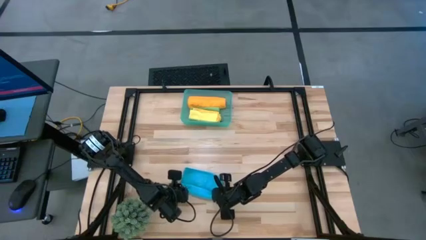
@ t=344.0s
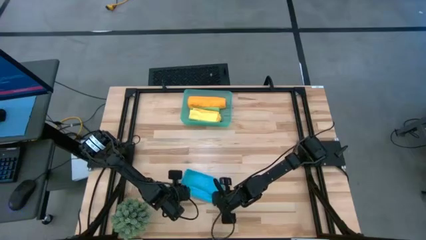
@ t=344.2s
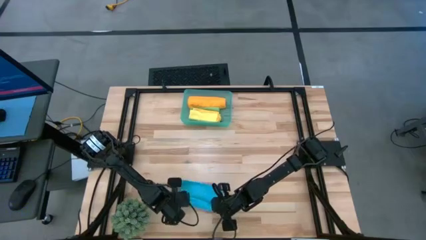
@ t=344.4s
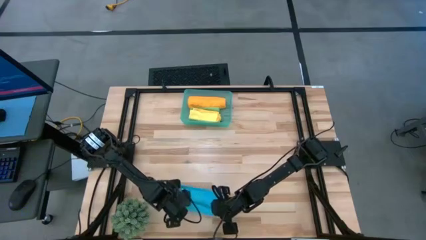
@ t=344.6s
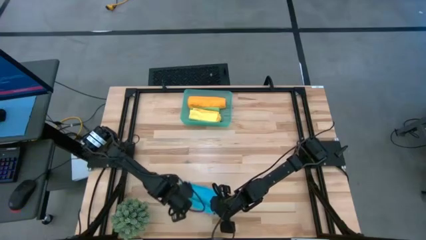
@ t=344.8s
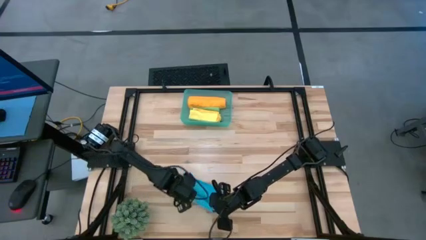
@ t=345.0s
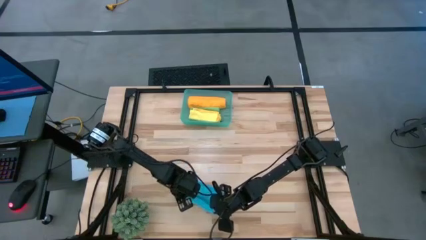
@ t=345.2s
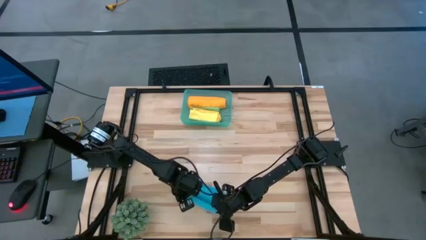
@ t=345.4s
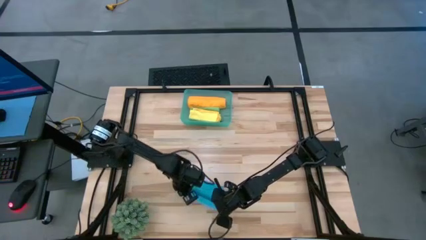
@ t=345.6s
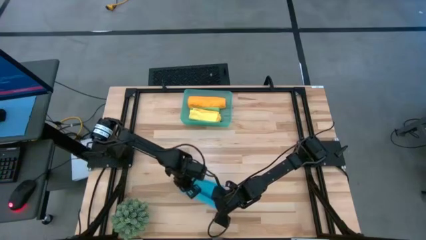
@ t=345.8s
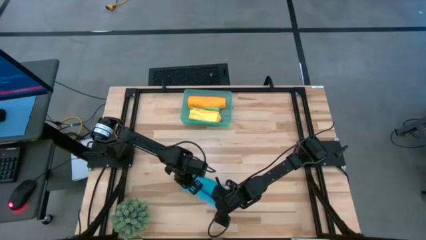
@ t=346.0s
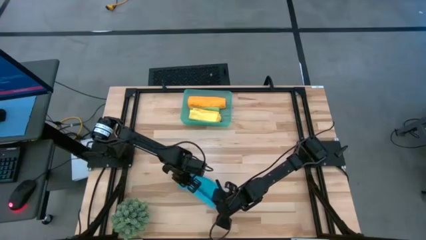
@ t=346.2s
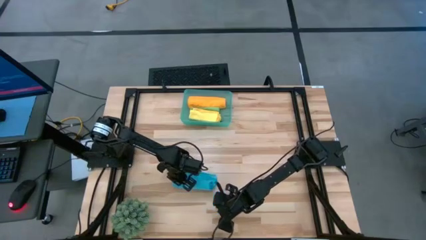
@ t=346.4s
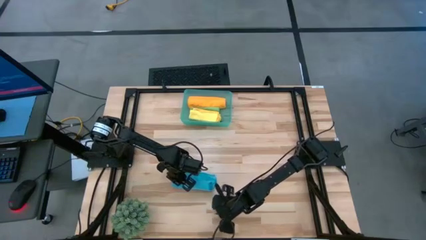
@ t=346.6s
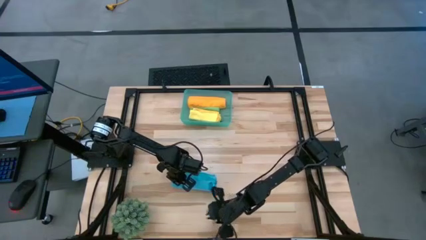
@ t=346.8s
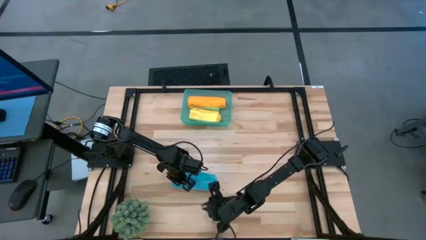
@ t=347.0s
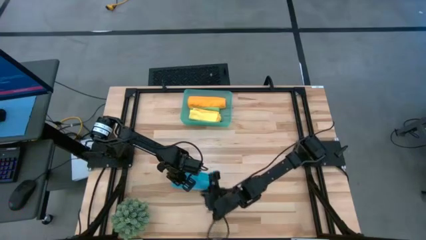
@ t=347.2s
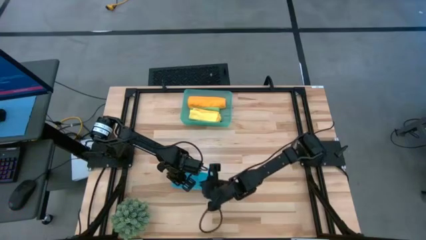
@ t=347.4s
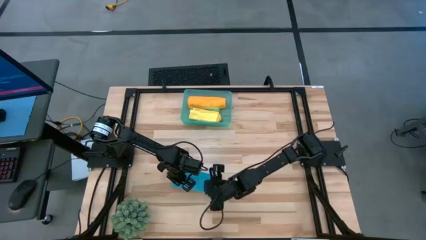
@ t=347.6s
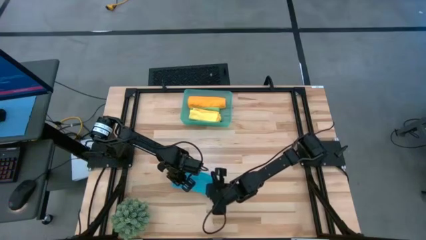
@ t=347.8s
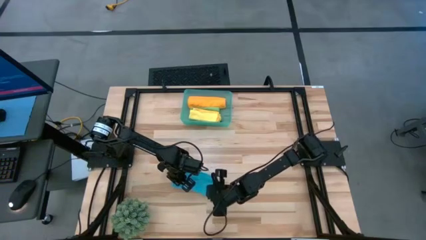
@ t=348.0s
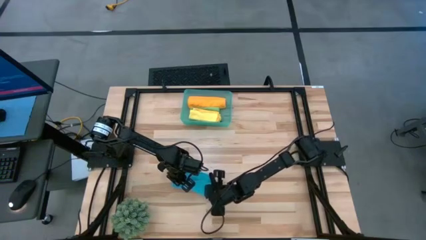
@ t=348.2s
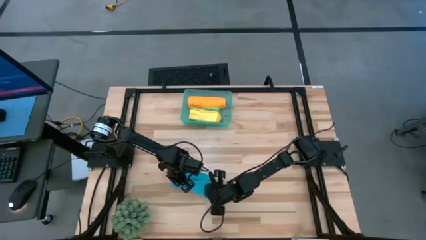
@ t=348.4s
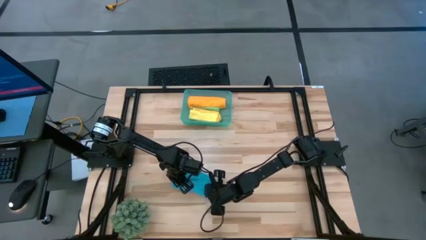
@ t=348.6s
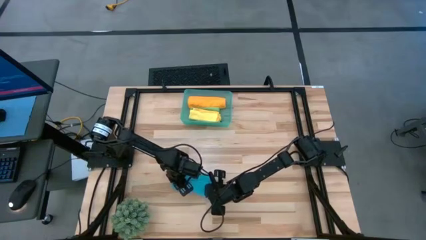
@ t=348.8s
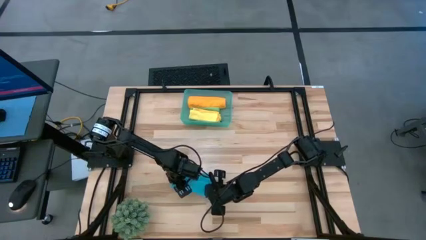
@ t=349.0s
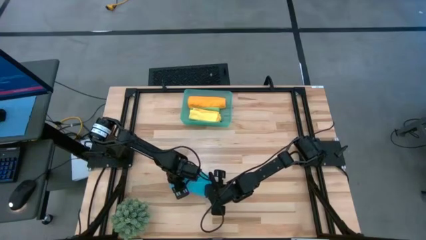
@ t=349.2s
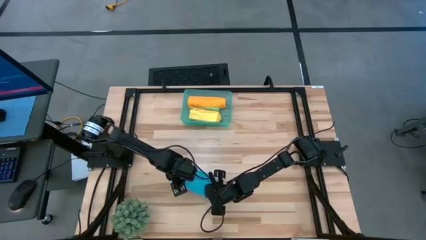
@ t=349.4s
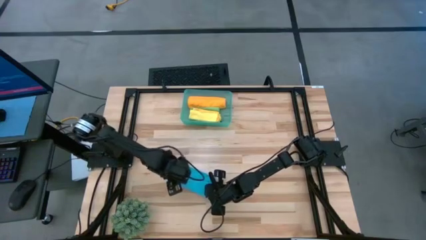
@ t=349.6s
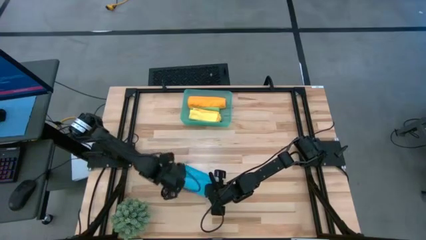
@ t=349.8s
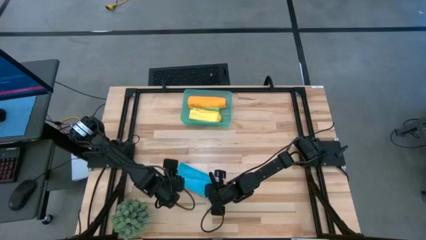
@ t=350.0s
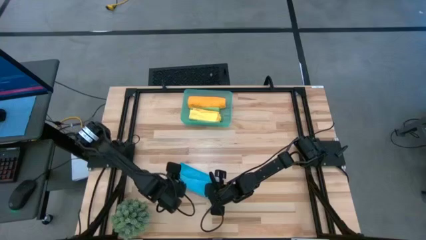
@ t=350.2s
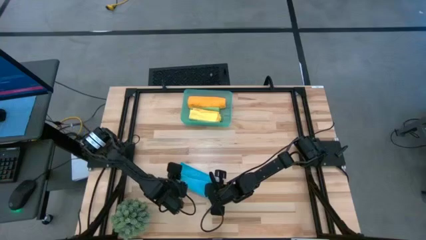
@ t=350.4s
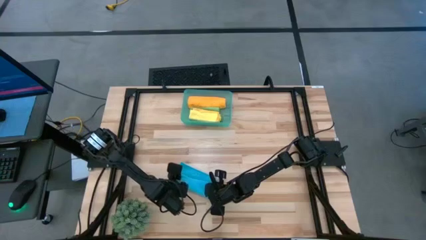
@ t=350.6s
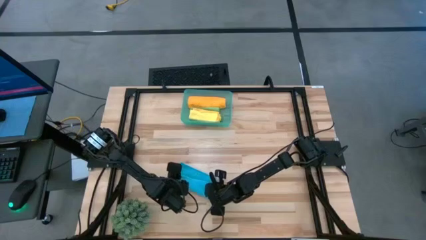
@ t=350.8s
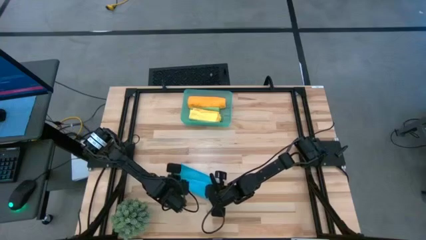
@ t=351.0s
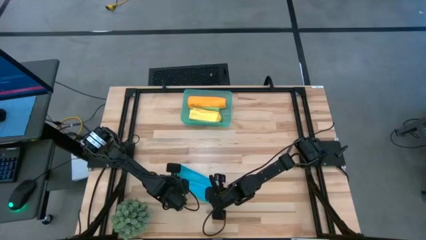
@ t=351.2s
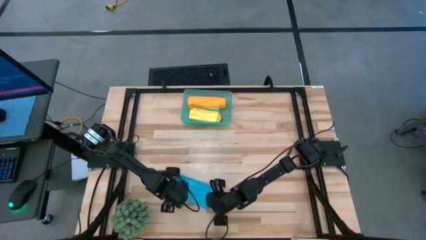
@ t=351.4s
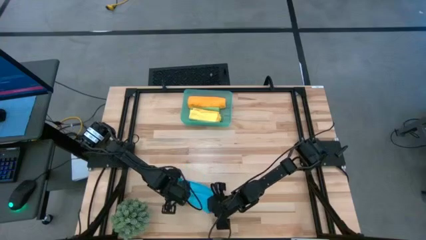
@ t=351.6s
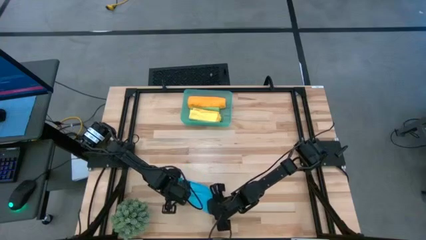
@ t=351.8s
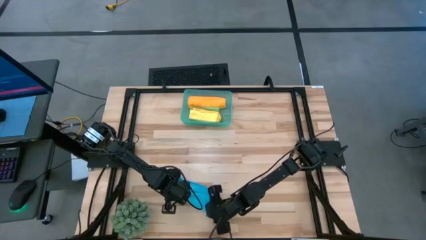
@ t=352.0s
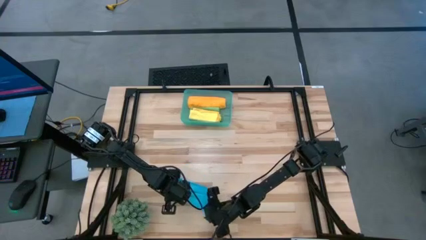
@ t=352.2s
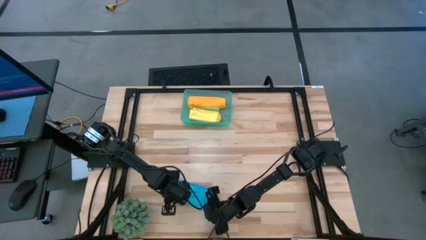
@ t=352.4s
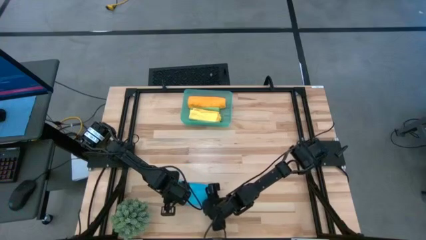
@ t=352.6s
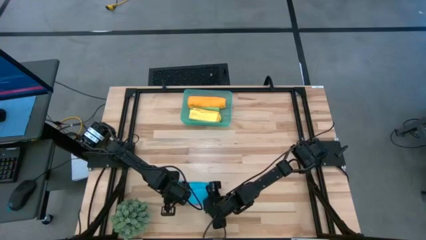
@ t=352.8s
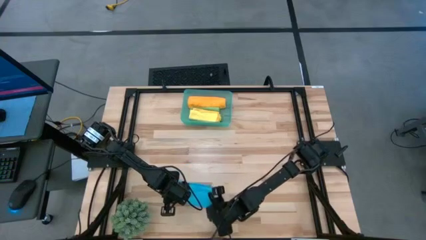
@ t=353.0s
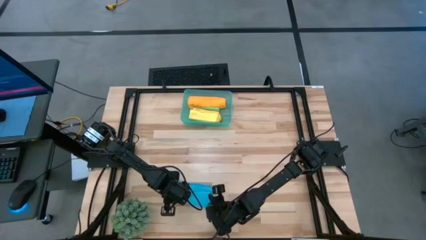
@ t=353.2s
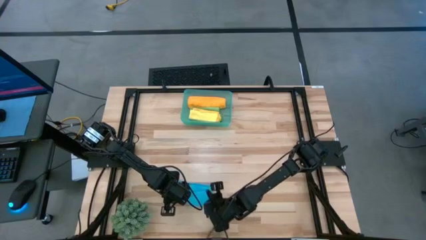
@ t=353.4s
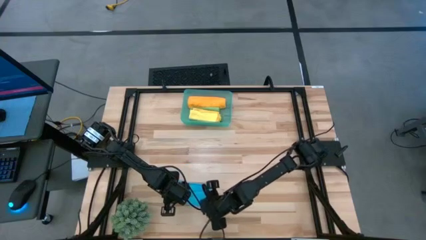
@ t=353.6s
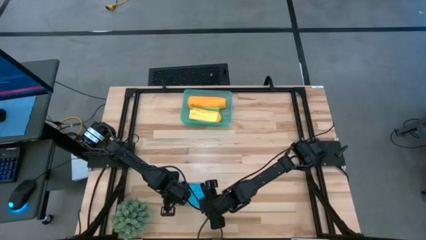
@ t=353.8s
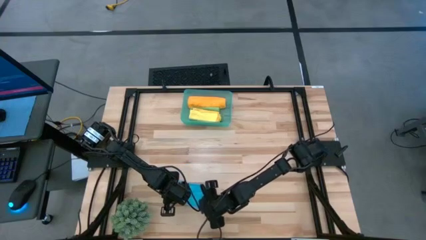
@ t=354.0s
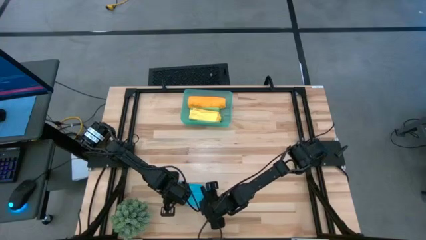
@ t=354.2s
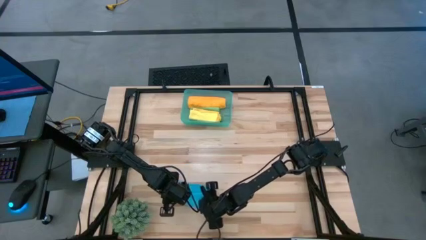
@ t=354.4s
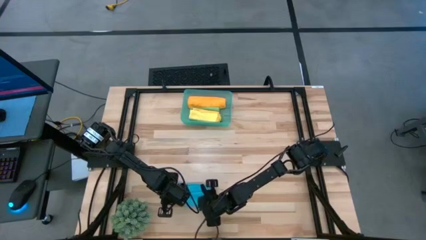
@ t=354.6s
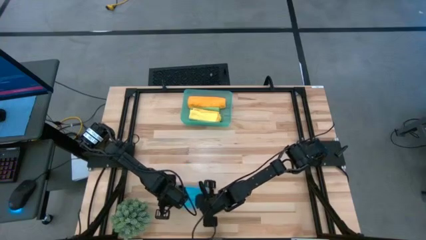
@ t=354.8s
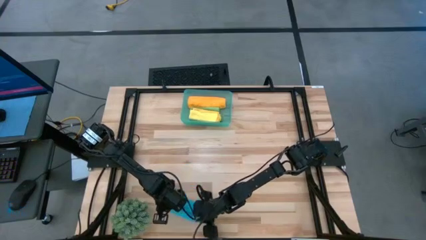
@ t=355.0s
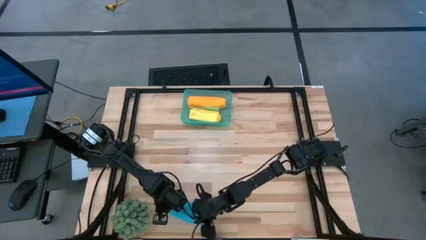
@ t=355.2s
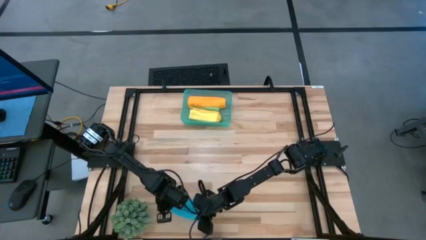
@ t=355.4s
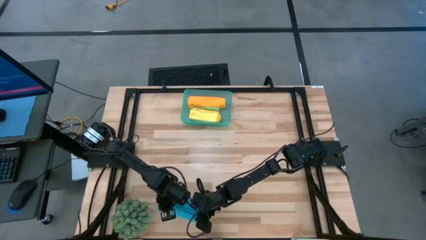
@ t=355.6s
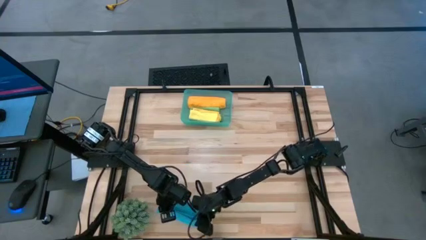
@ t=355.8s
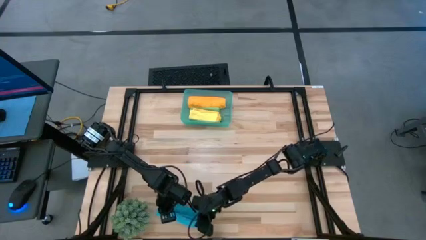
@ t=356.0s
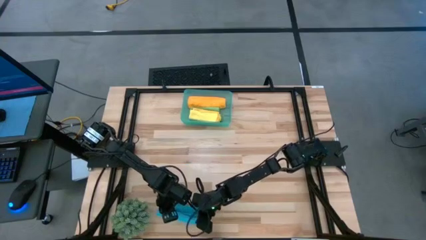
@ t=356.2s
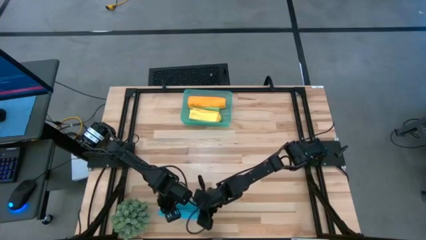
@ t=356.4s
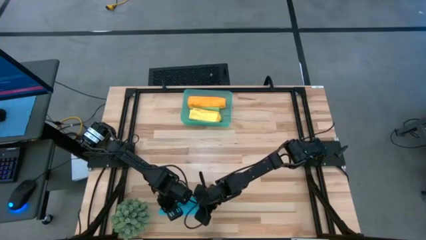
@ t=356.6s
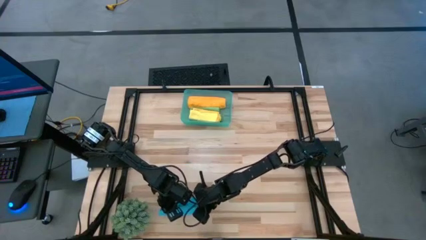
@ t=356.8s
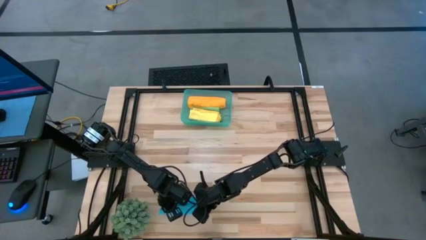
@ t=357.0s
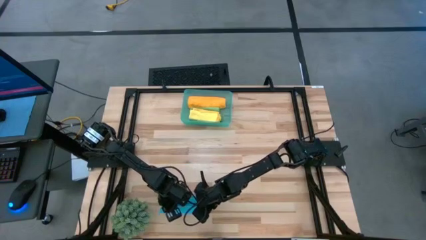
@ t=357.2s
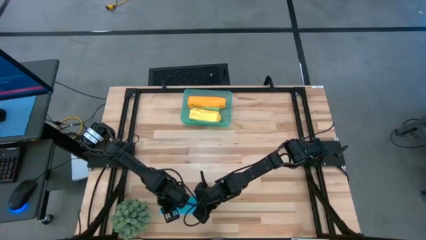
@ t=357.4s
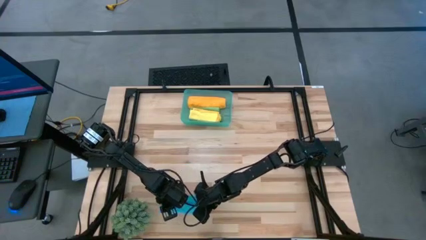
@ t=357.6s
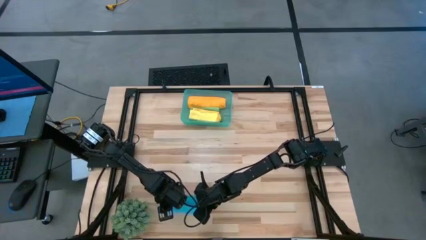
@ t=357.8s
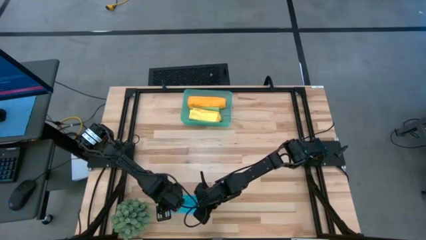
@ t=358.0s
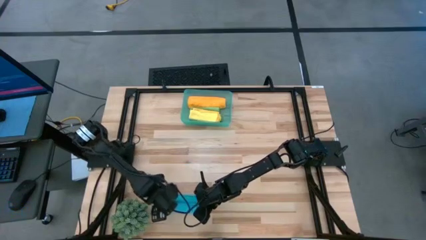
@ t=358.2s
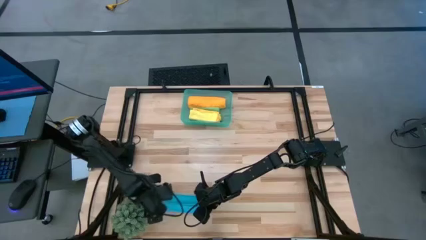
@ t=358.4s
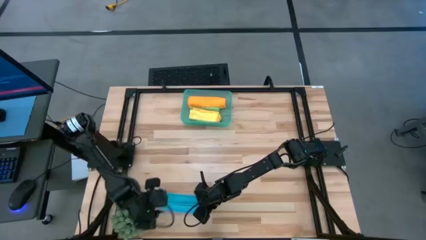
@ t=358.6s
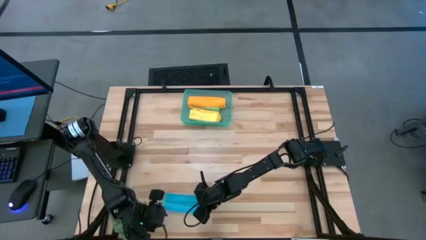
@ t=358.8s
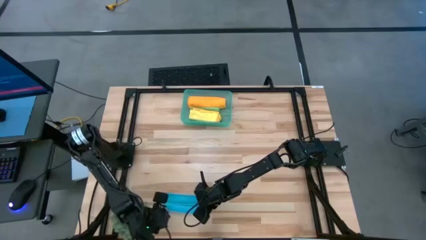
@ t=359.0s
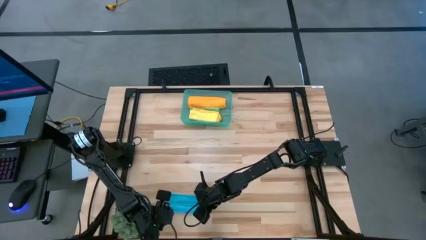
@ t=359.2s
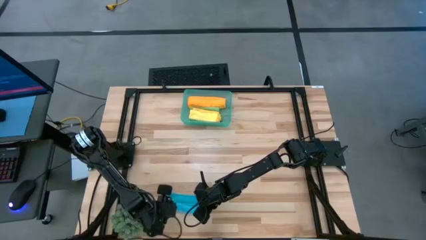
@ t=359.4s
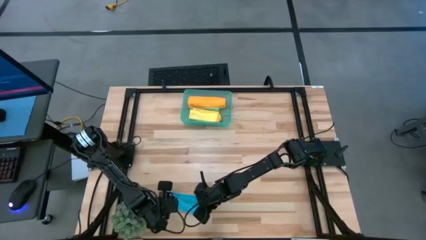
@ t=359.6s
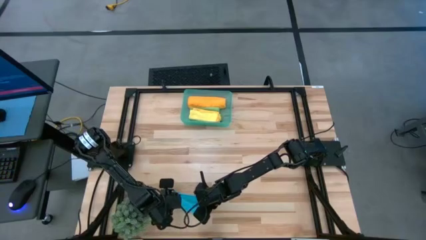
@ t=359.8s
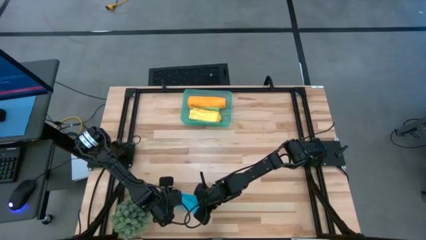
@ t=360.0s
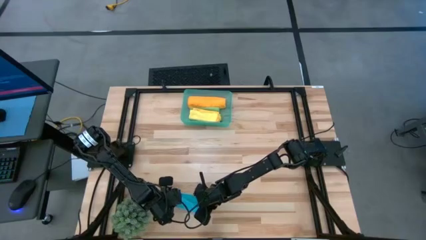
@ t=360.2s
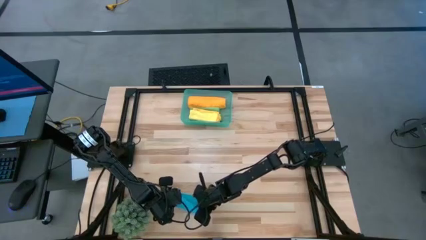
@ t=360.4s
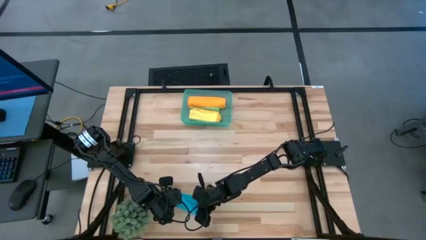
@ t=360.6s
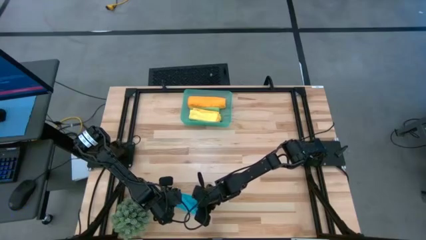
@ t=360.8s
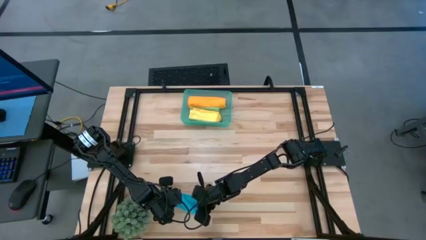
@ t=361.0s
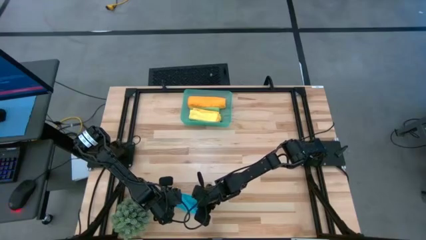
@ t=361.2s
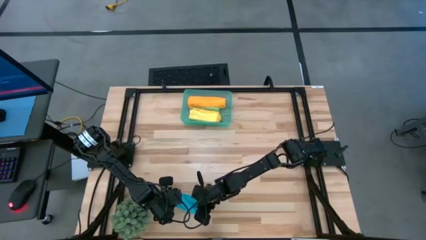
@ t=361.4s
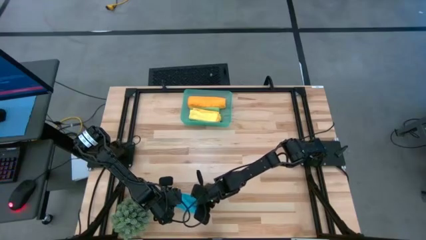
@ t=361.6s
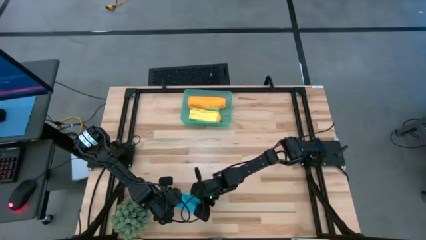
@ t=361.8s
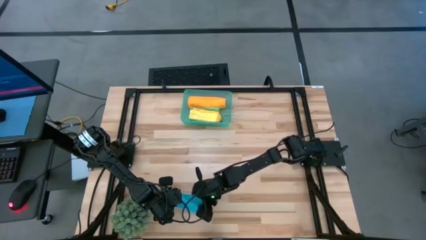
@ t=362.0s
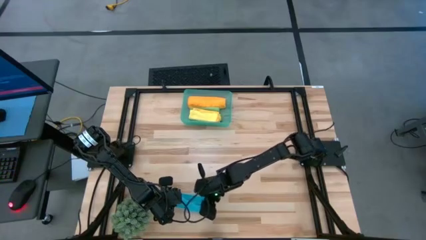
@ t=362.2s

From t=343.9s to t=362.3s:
Task: Roll microfiber towels into tight, uniform cylinder then place into a basket
Fold the blue towel
